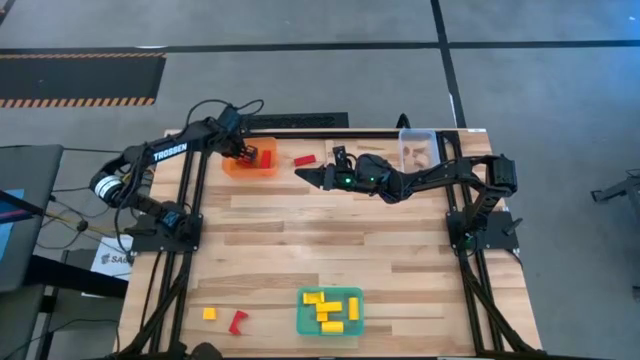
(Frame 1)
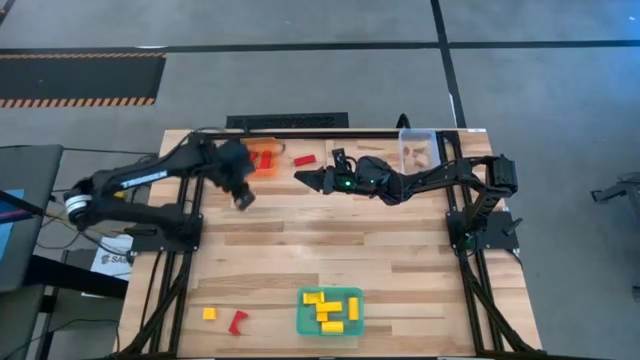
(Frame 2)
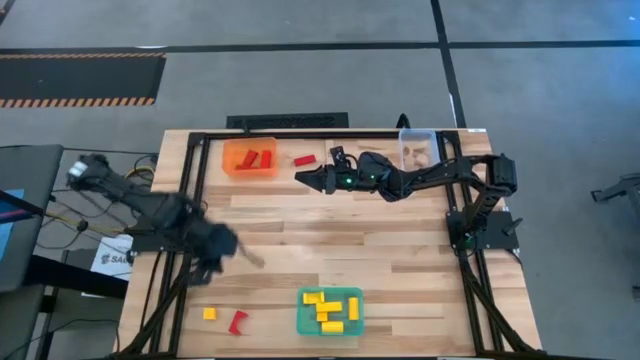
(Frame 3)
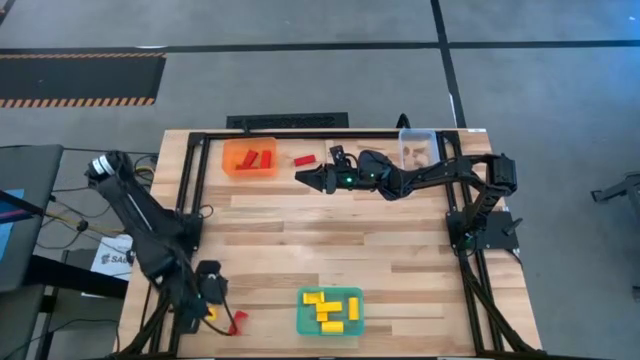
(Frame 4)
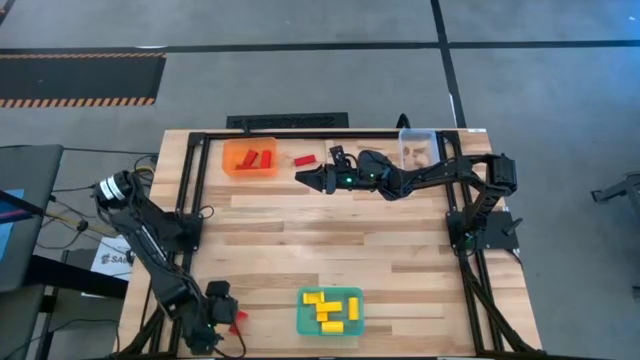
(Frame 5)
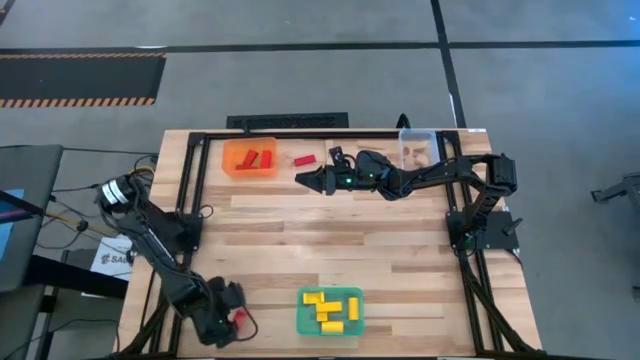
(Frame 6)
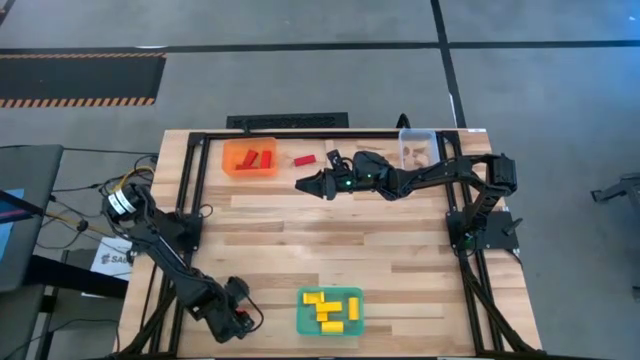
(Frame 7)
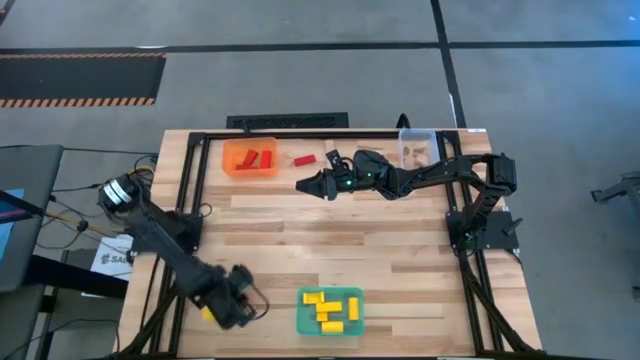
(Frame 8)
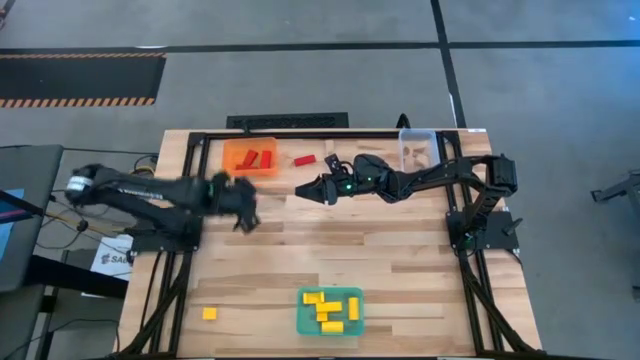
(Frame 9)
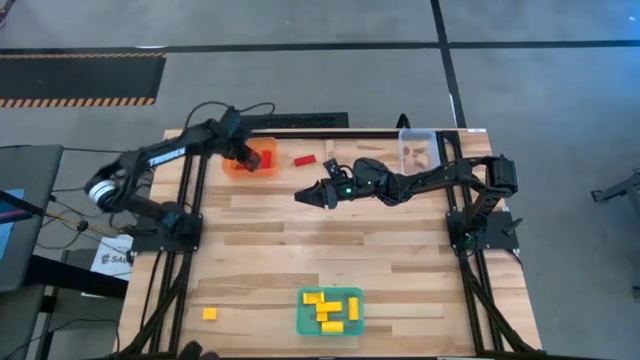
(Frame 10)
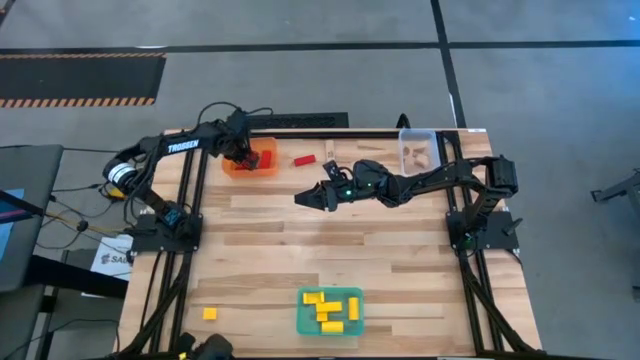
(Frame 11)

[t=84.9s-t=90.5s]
Task: Sort & place blocks by color
Put the block into the orange bin

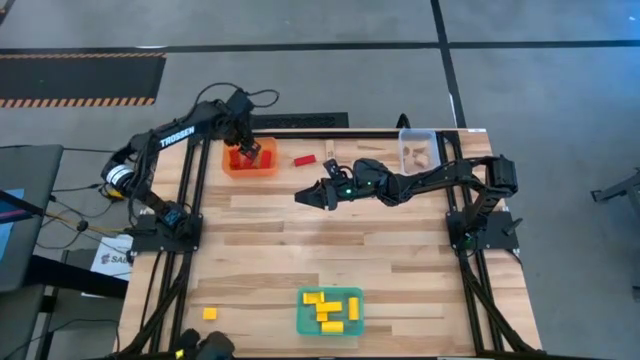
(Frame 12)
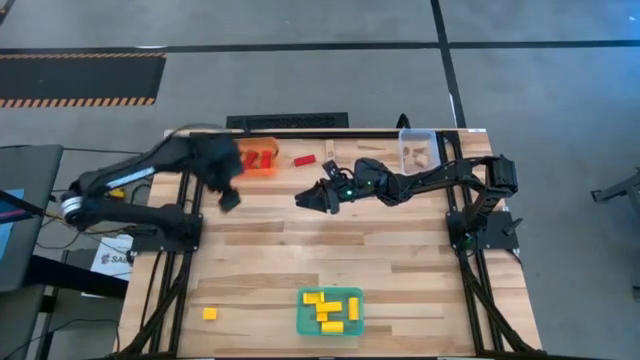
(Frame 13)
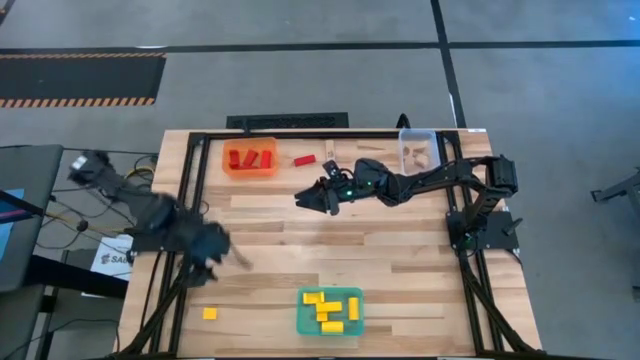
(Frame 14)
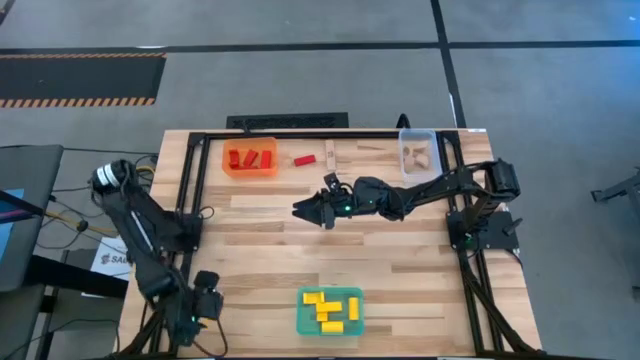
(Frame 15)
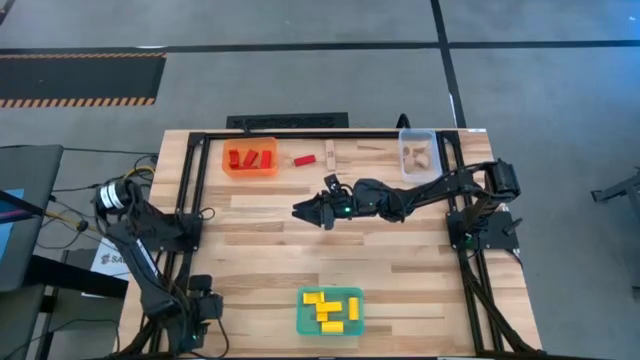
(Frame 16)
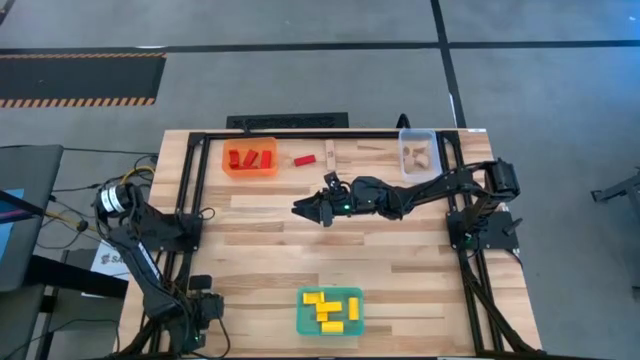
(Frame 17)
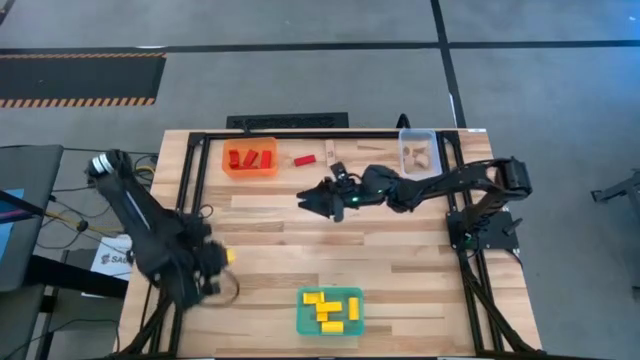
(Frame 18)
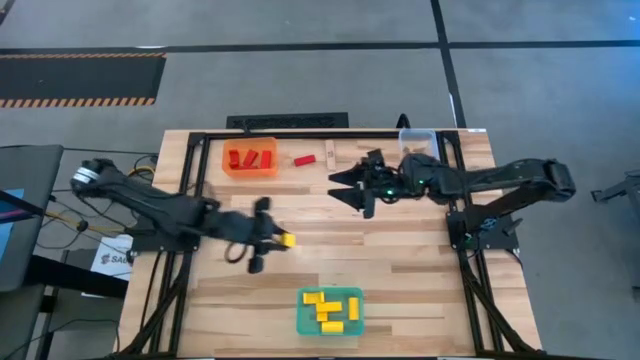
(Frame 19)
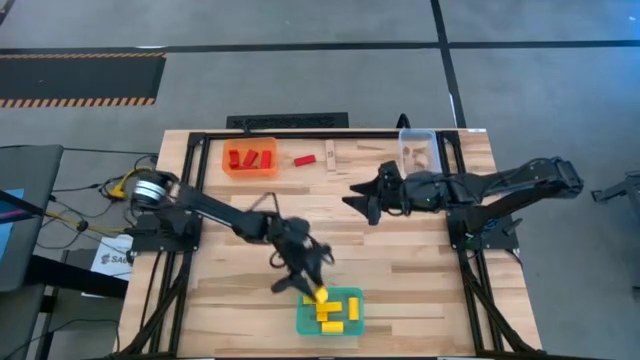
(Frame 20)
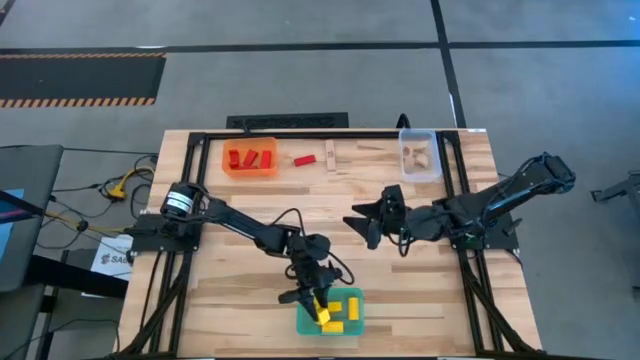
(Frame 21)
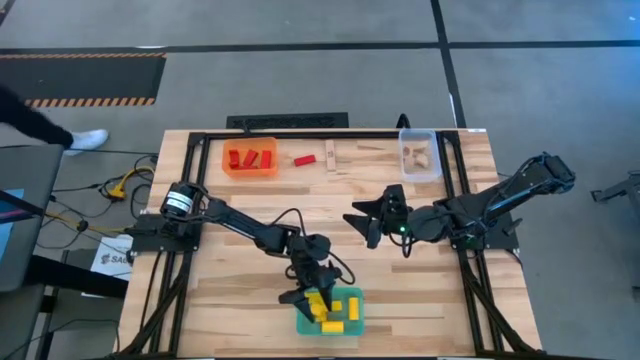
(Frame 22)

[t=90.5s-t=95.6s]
Put the yellow block into the blue bin

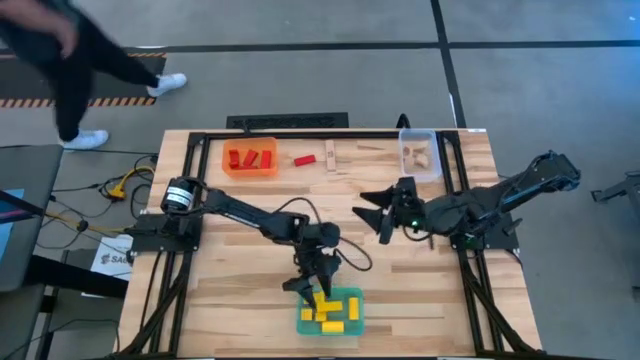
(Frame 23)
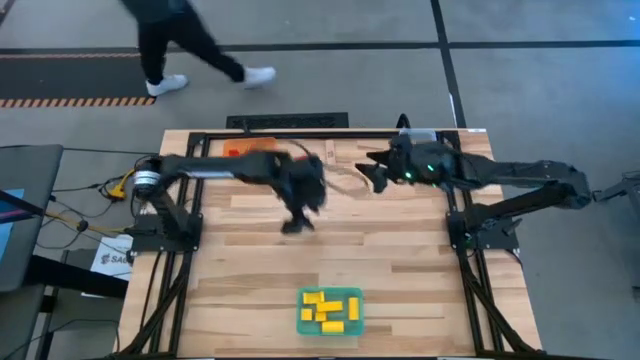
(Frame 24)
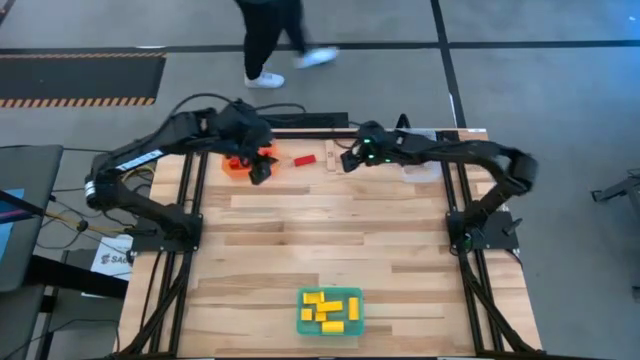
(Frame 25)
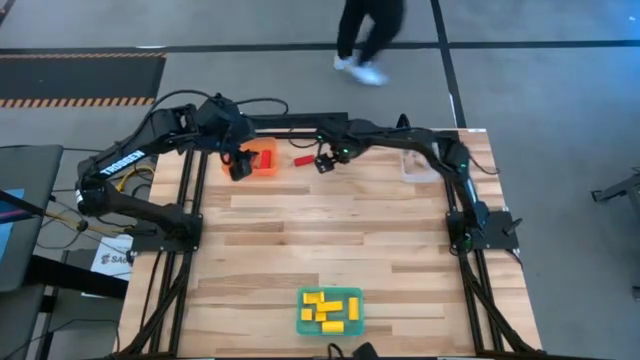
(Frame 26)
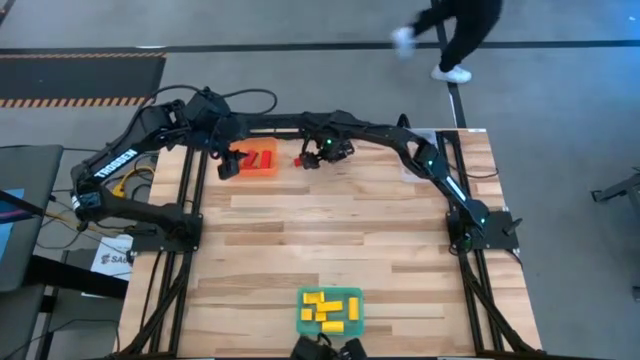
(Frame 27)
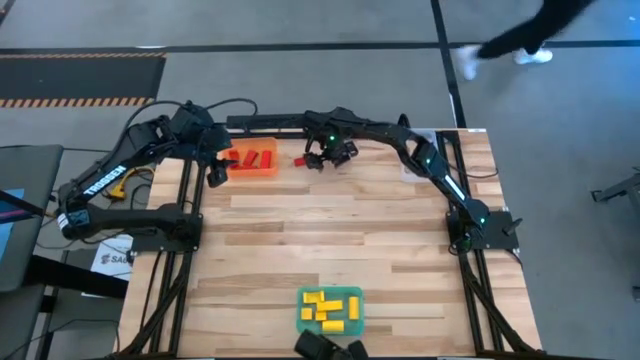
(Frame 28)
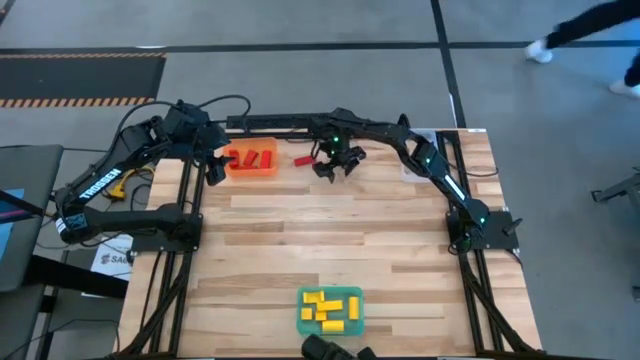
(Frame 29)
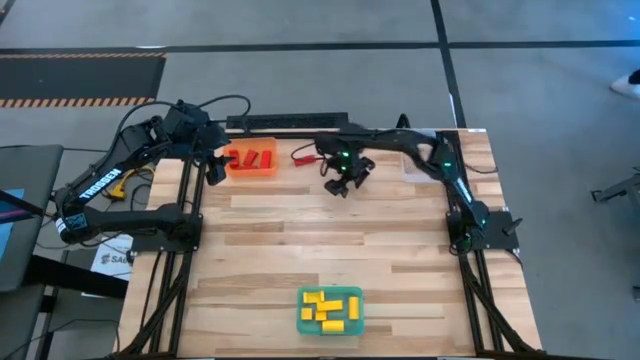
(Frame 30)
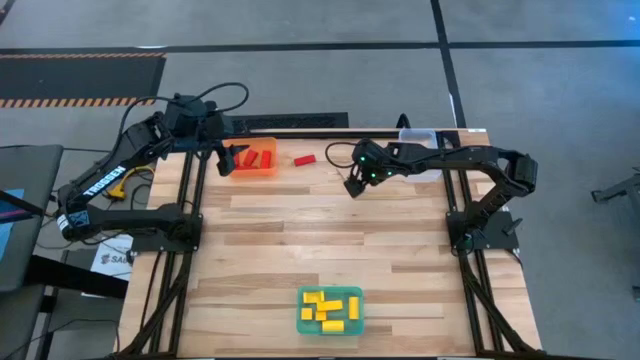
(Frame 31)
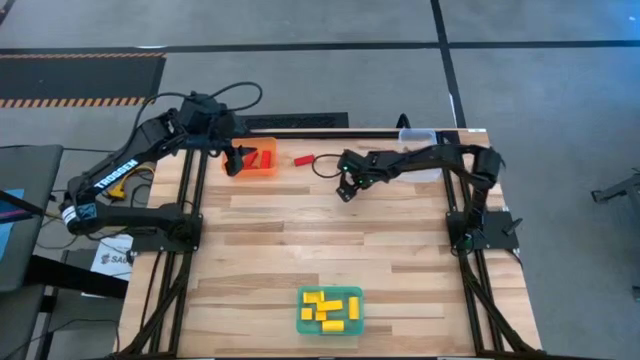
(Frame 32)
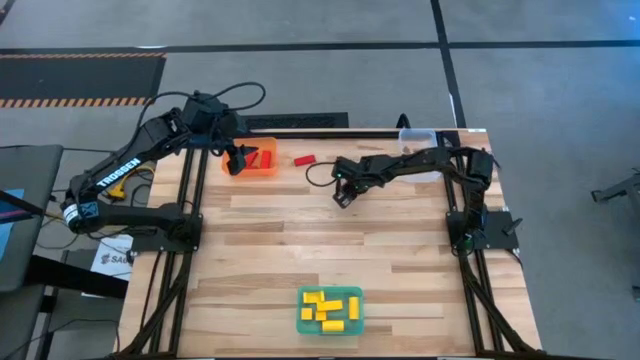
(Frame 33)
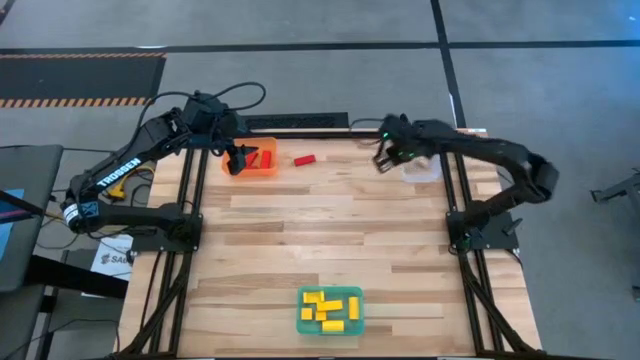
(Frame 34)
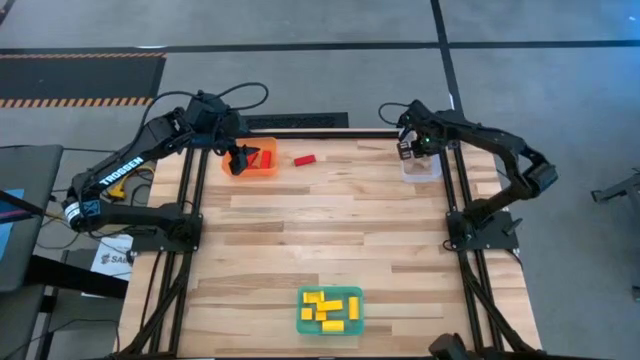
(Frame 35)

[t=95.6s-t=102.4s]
Put the brown block into the transparent bin

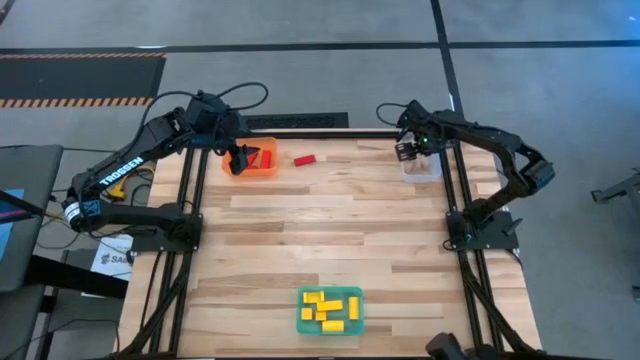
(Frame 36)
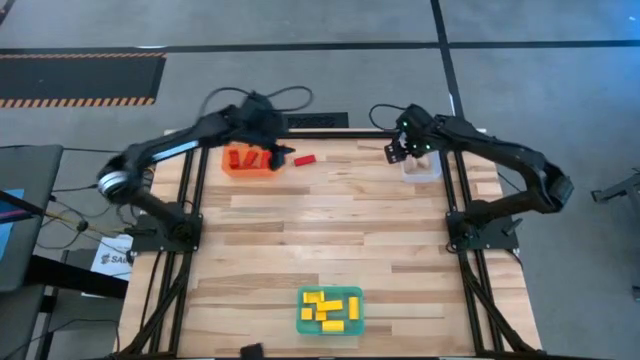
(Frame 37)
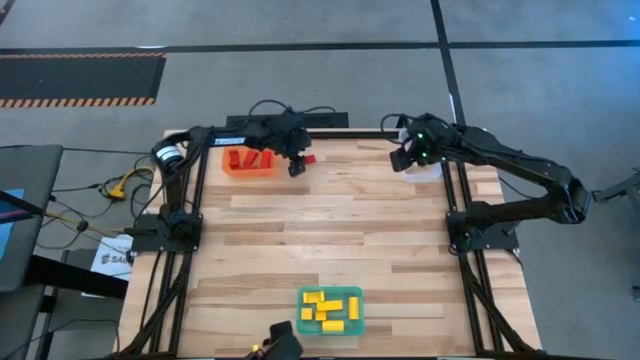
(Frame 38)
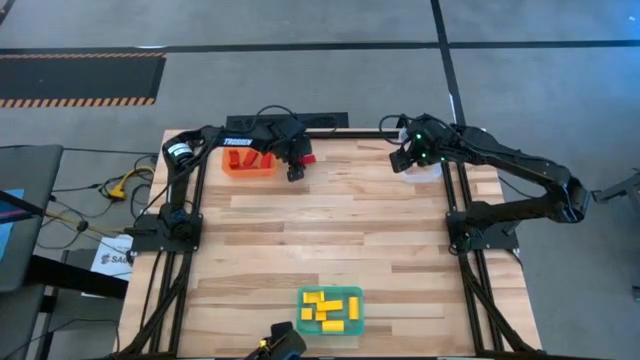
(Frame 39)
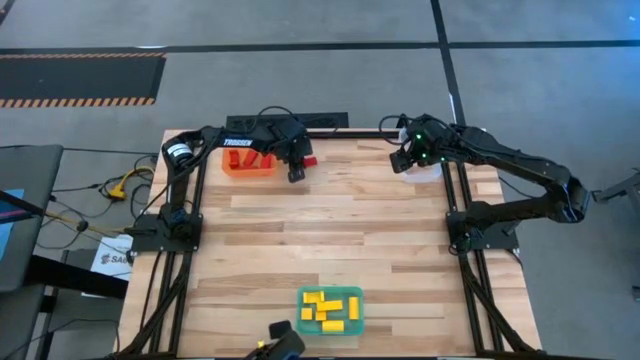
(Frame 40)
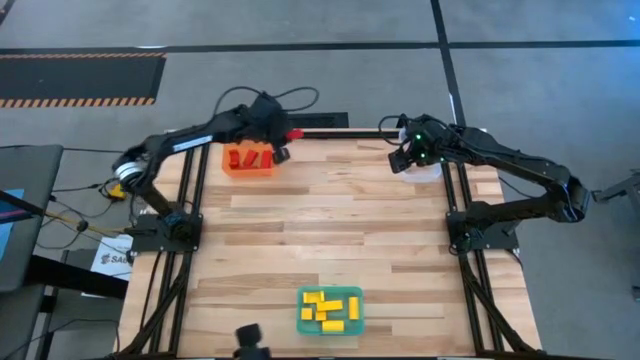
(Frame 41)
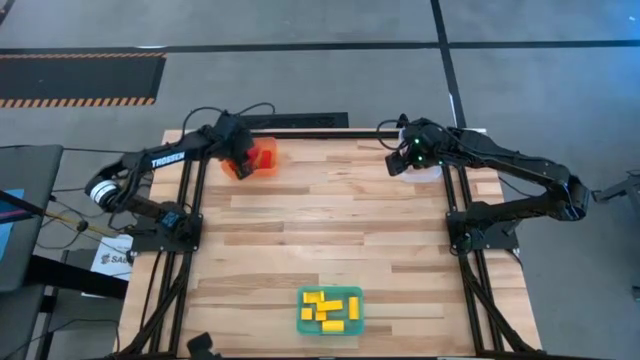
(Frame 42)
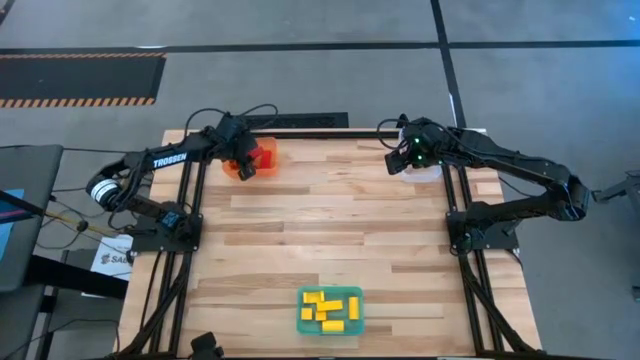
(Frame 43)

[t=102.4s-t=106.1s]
Put the red block into the orange bin
